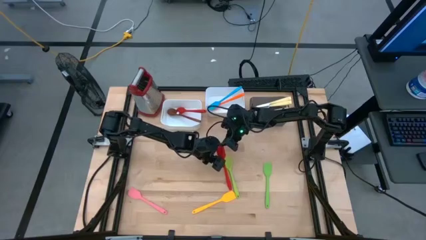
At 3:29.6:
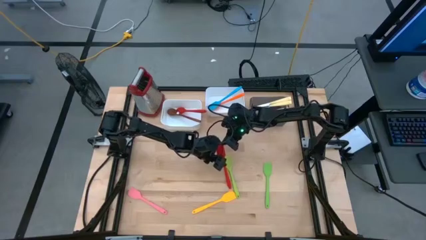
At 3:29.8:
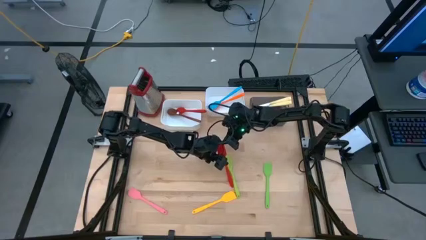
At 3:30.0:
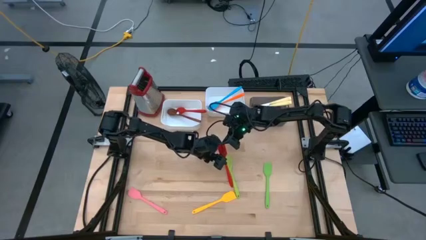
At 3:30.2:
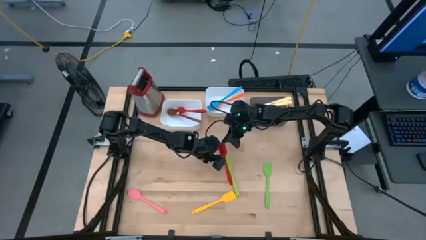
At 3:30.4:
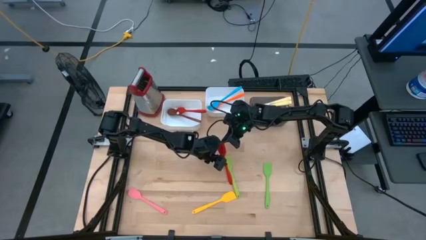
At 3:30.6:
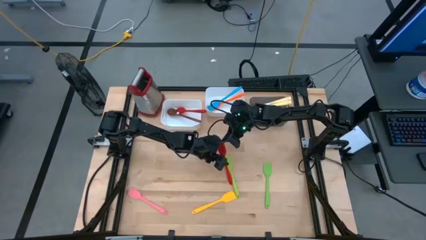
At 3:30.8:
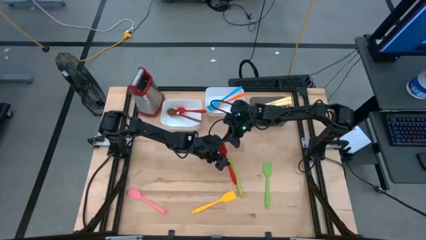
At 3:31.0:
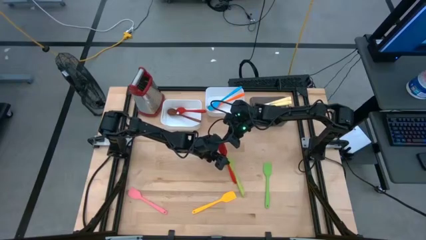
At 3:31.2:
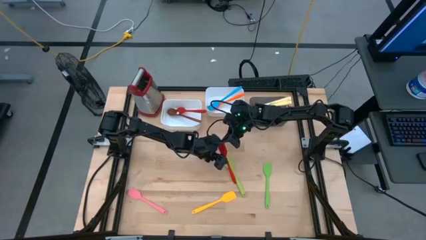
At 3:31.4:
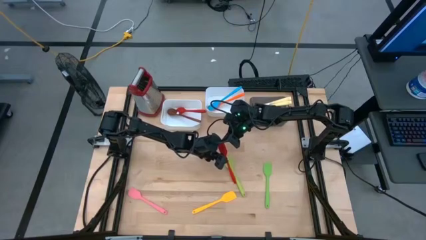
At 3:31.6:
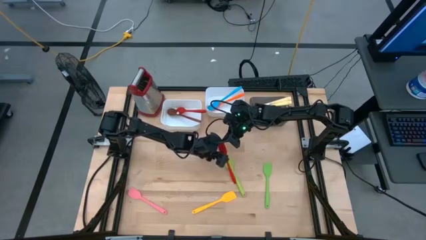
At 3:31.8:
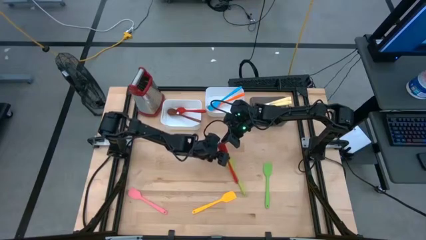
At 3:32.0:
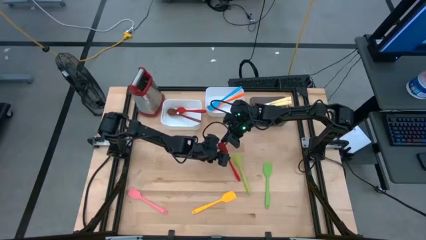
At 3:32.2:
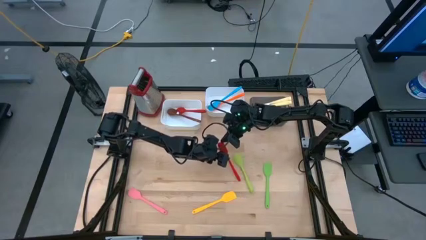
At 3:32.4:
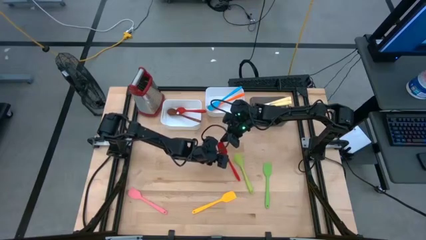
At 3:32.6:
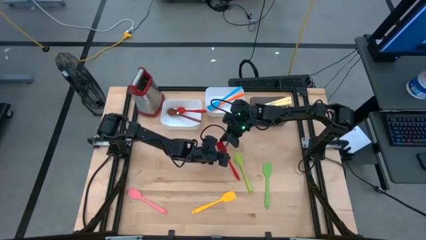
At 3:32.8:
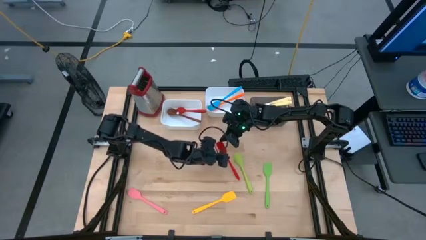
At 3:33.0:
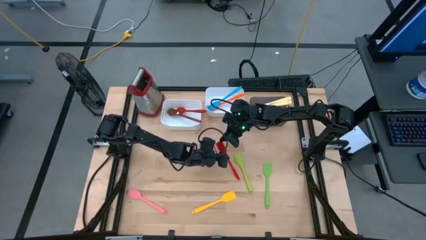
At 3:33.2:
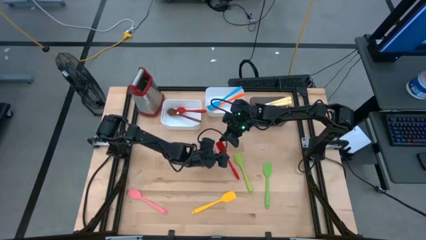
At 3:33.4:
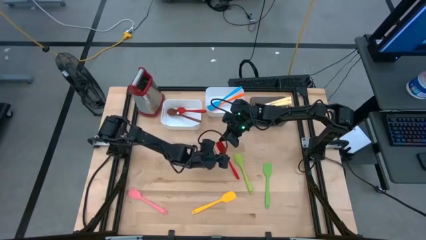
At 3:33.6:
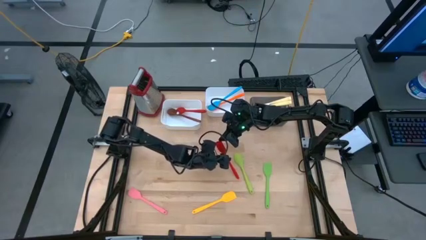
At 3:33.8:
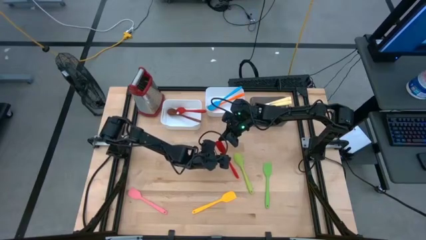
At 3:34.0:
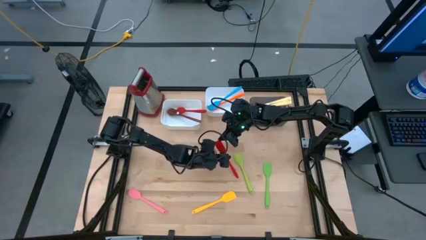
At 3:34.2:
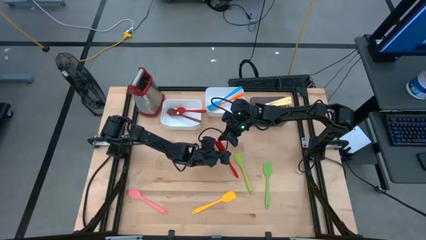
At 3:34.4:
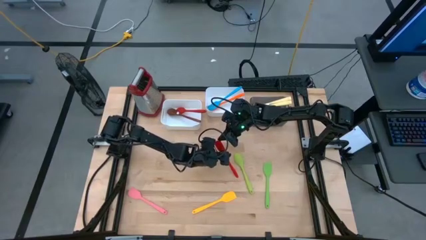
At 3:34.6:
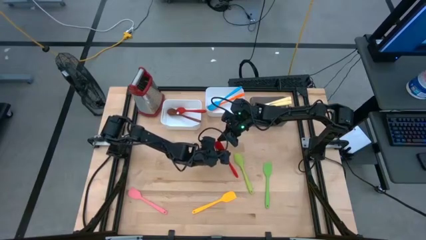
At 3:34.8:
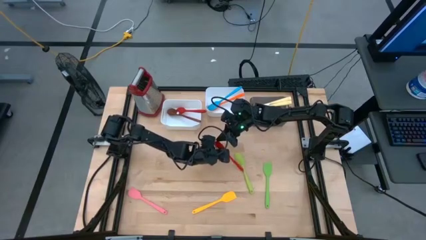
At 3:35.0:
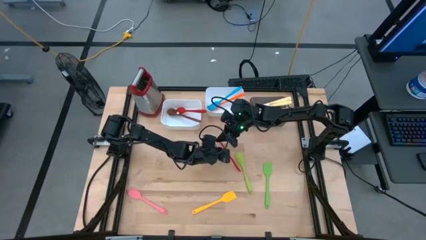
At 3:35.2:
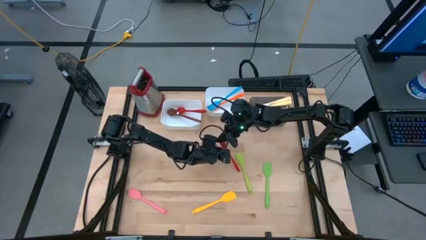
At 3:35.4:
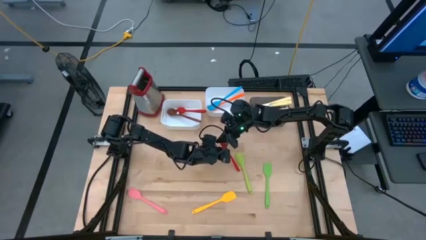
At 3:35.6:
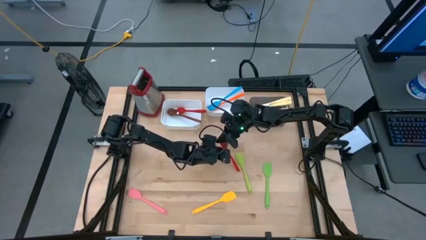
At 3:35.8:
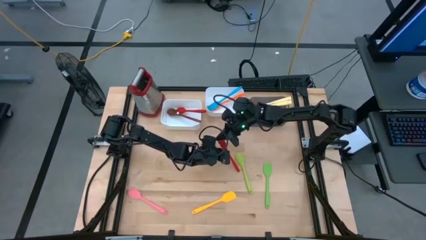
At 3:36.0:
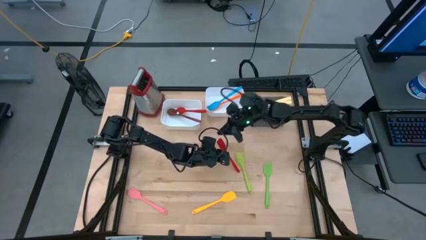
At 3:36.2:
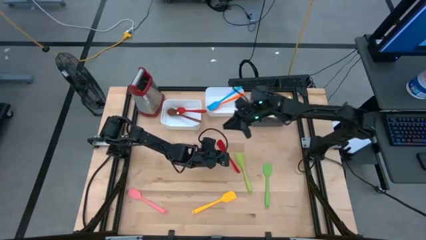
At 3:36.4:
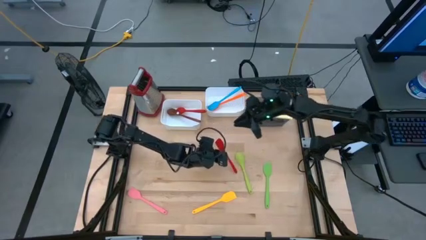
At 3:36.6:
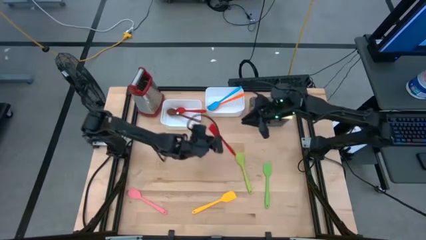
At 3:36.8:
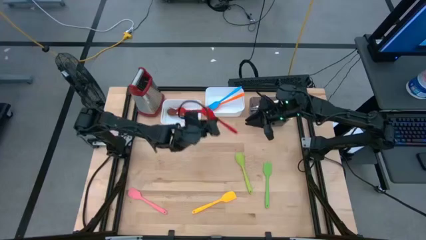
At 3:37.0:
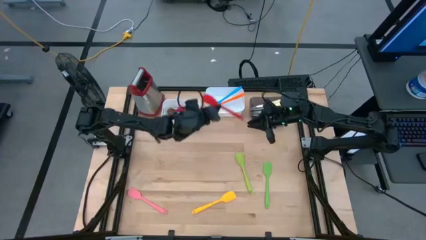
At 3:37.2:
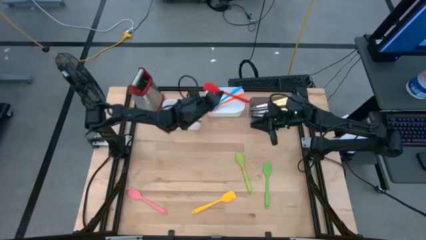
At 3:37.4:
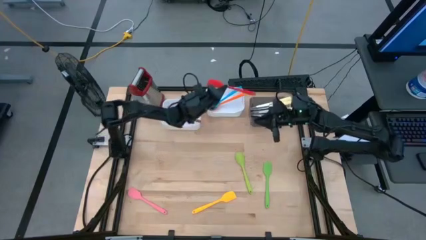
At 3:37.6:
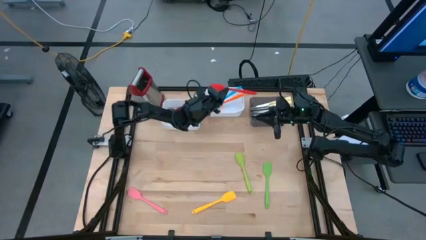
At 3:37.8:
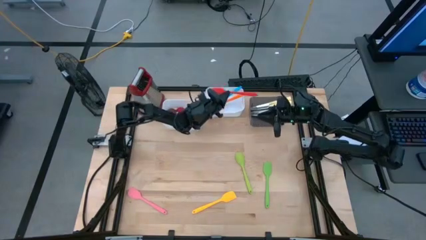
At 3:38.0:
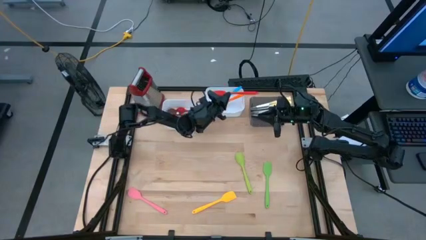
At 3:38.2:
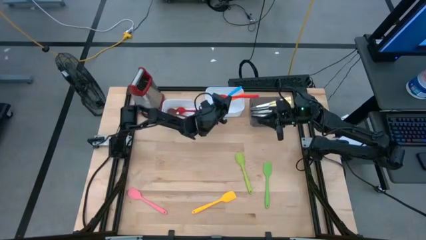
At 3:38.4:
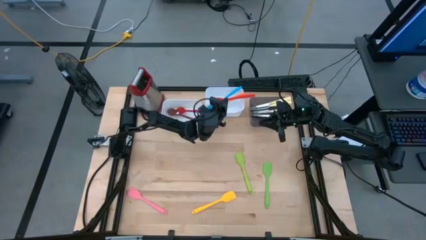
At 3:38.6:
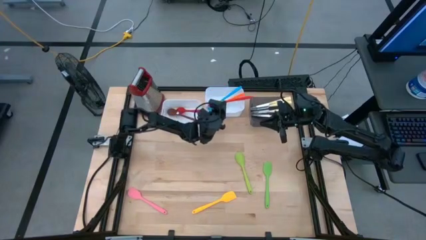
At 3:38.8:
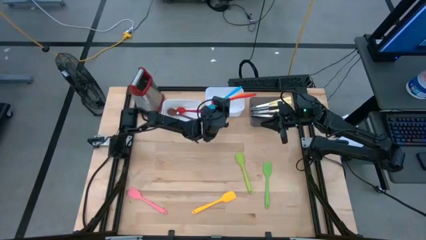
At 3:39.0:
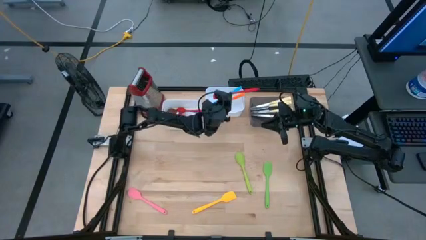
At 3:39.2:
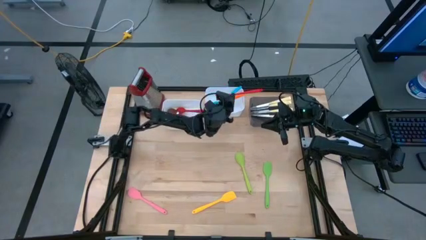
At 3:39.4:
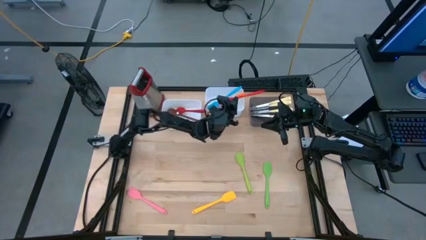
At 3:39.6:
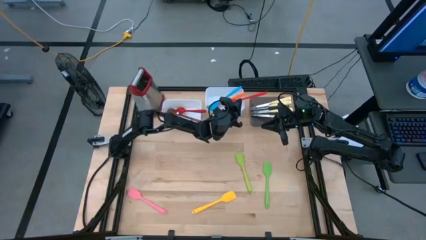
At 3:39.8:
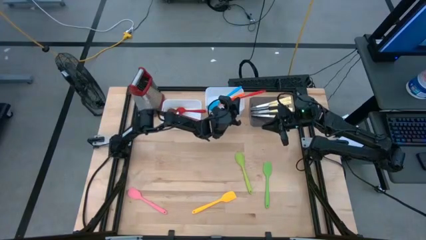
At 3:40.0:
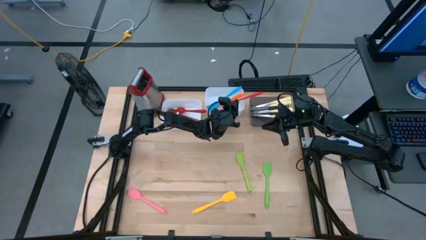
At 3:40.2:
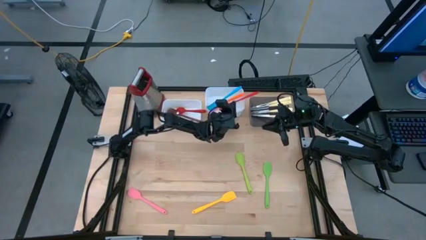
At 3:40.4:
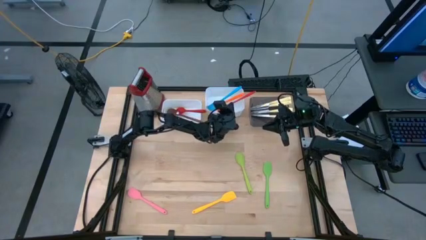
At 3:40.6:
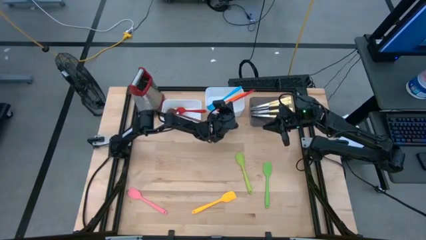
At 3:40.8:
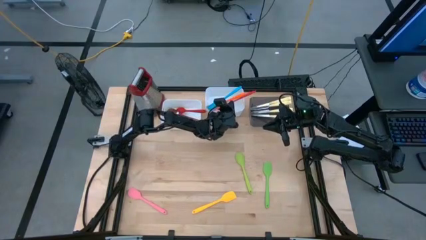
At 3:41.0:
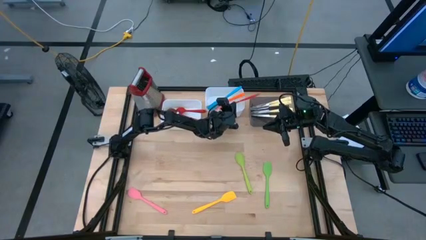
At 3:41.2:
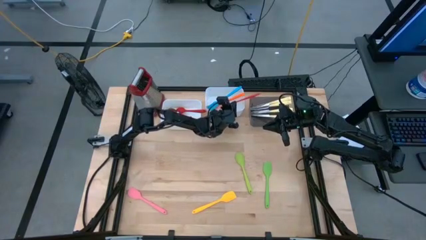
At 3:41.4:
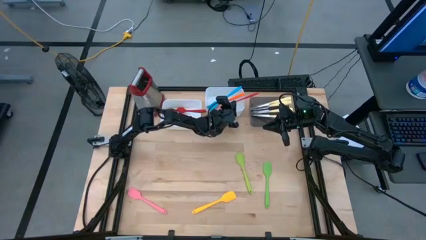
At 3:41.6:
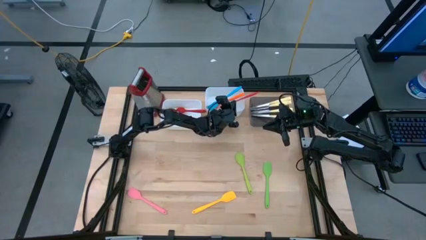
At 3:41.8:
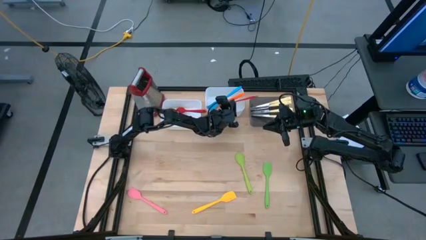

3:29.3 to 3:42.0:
Task: Pick & Place Kitchen Items
Put the red spatula into the right white bin
